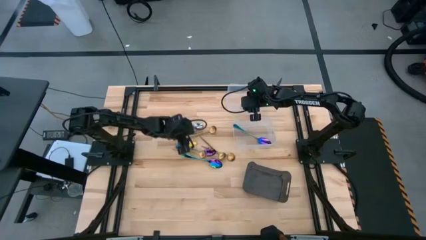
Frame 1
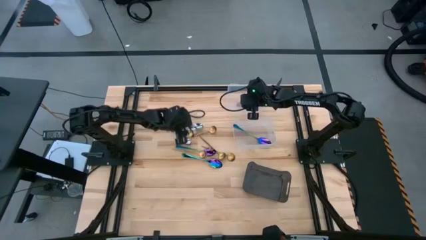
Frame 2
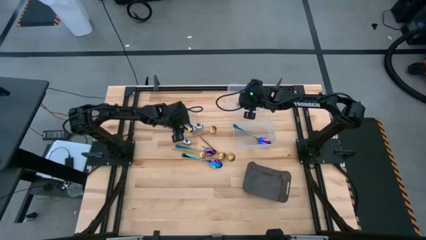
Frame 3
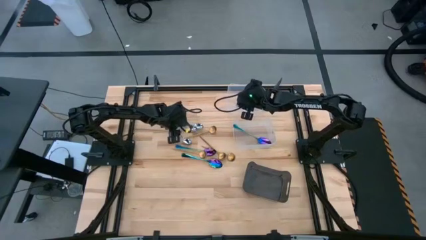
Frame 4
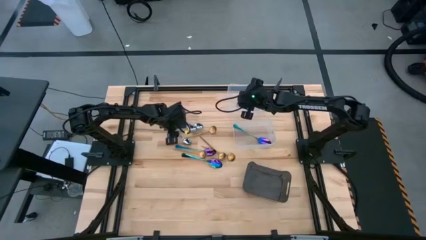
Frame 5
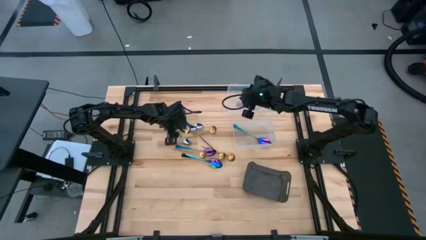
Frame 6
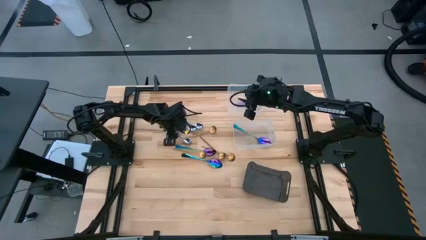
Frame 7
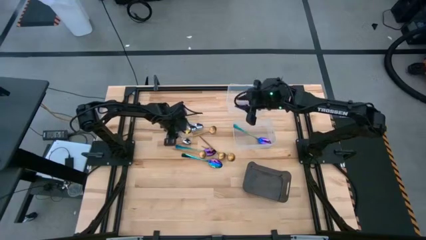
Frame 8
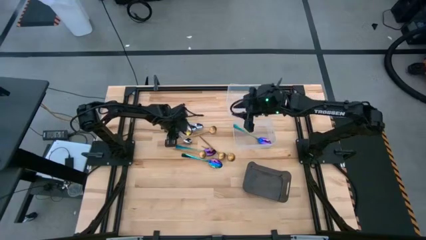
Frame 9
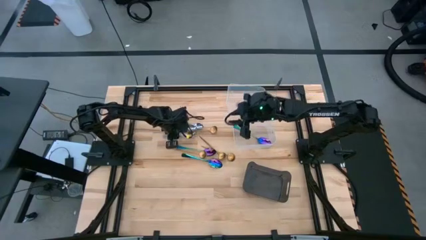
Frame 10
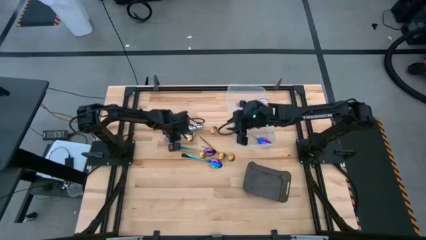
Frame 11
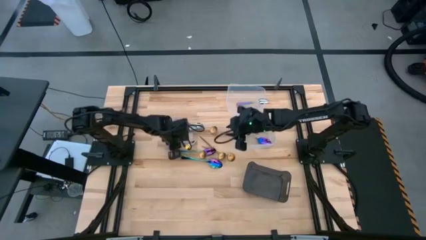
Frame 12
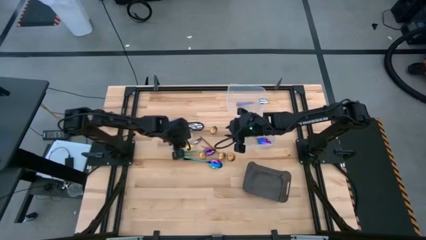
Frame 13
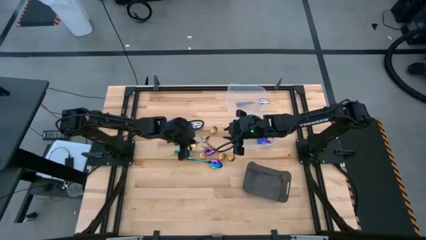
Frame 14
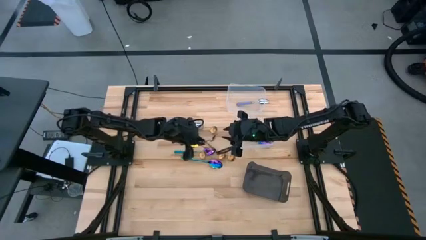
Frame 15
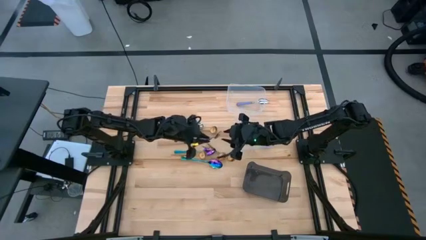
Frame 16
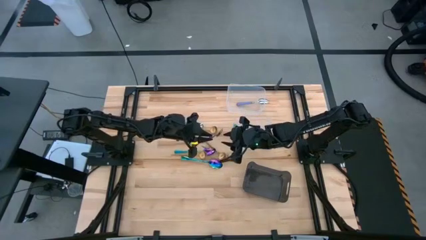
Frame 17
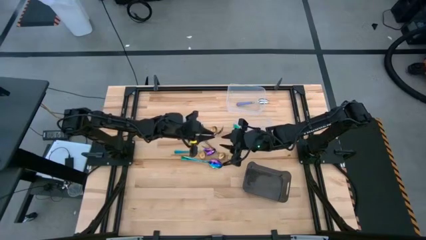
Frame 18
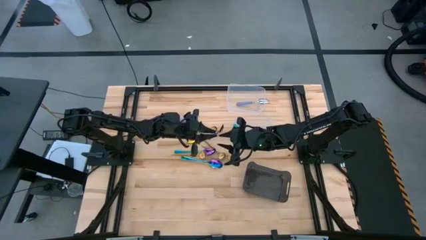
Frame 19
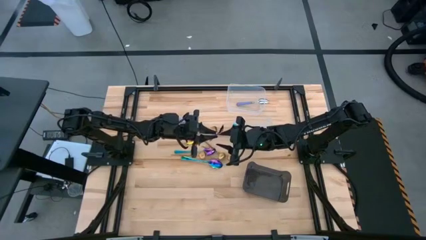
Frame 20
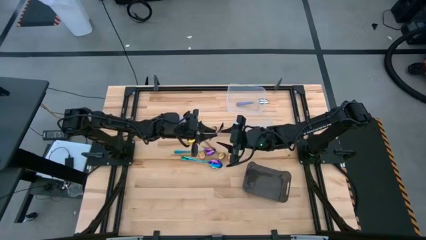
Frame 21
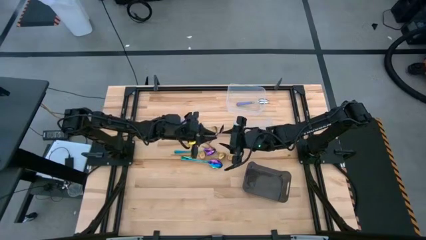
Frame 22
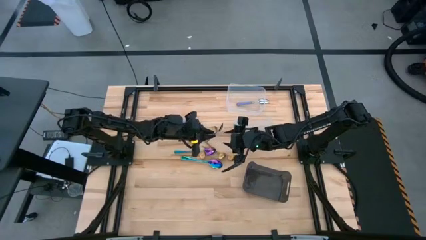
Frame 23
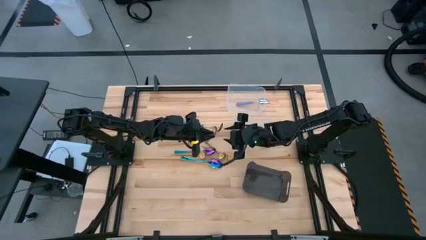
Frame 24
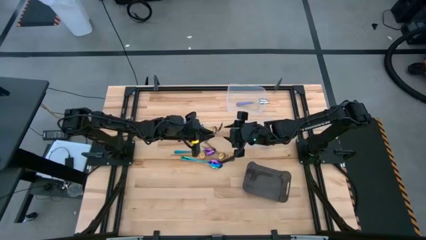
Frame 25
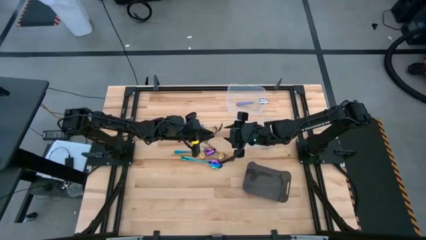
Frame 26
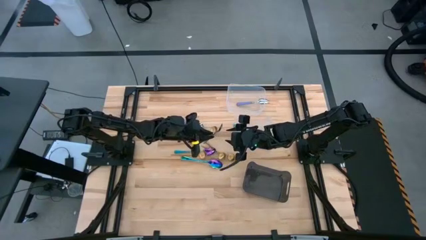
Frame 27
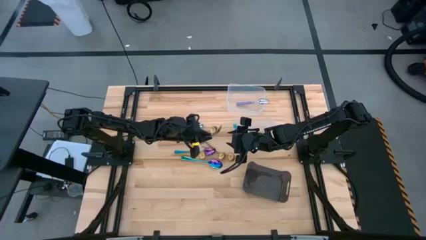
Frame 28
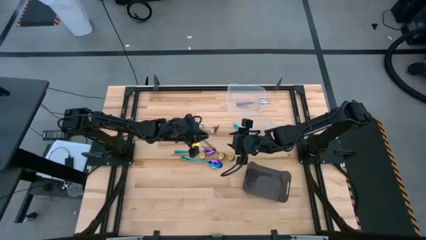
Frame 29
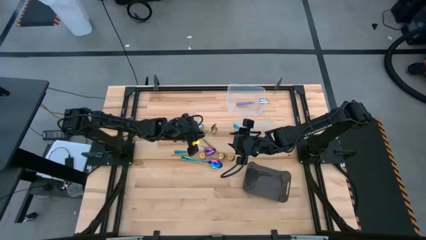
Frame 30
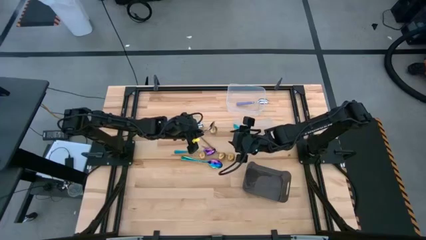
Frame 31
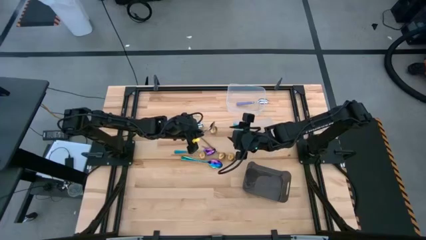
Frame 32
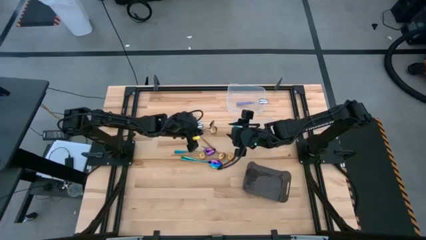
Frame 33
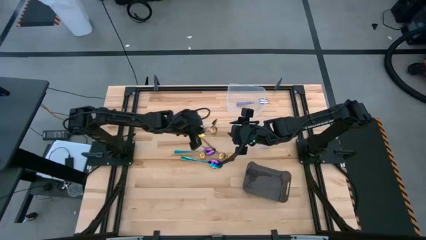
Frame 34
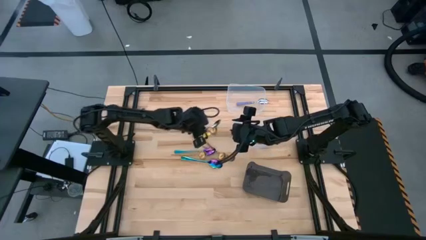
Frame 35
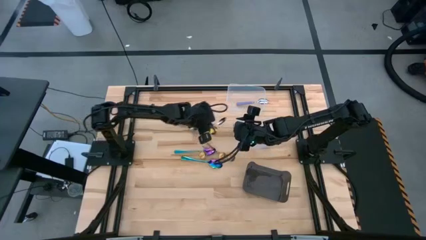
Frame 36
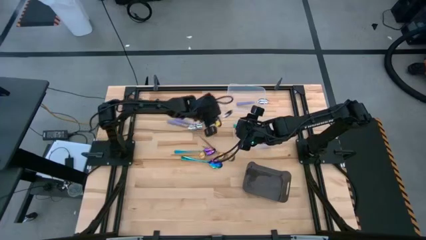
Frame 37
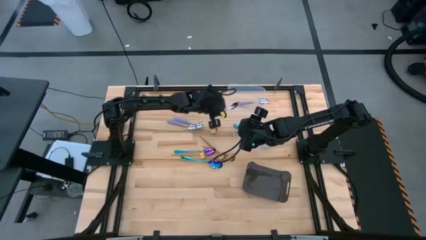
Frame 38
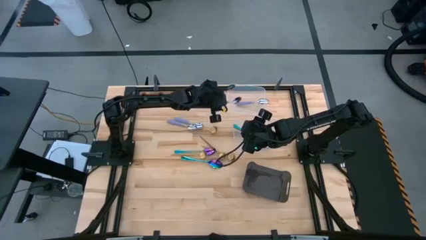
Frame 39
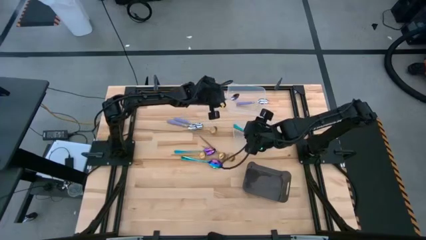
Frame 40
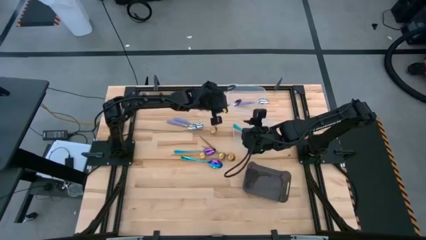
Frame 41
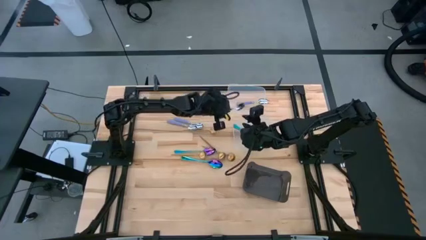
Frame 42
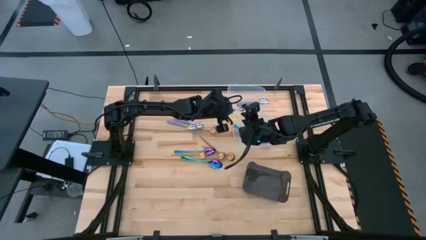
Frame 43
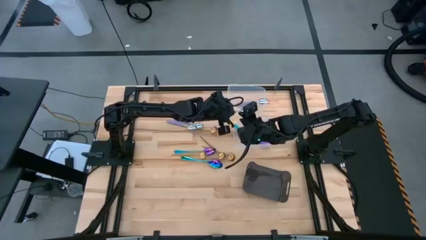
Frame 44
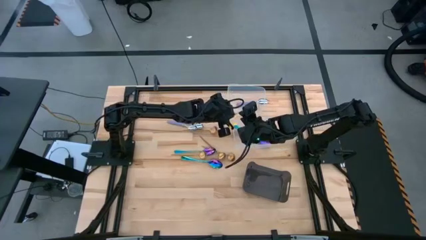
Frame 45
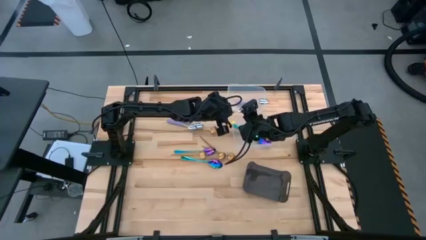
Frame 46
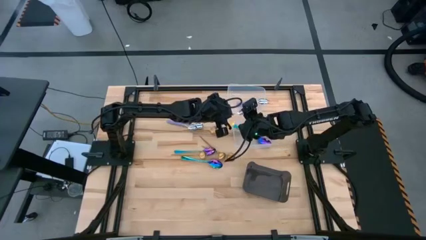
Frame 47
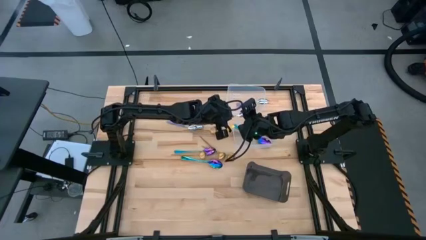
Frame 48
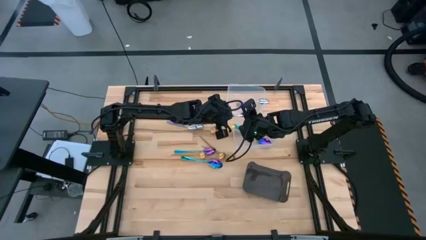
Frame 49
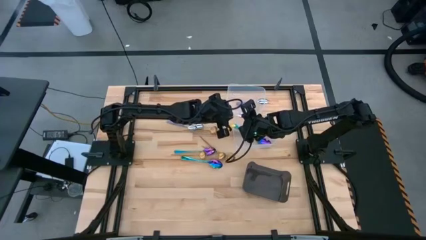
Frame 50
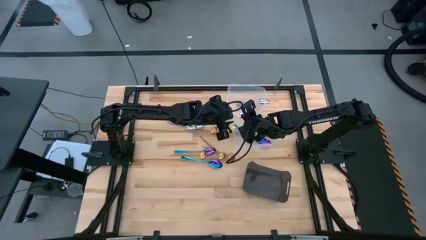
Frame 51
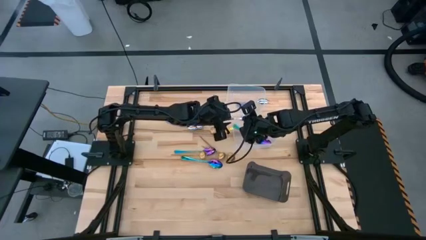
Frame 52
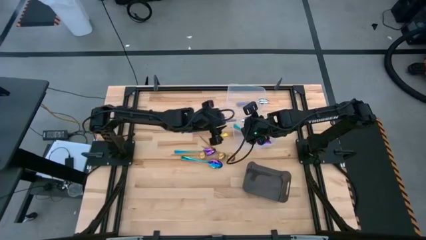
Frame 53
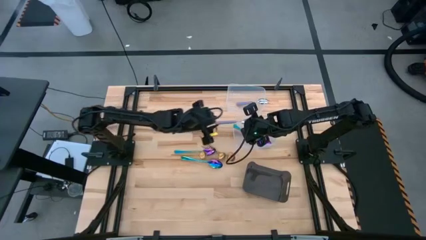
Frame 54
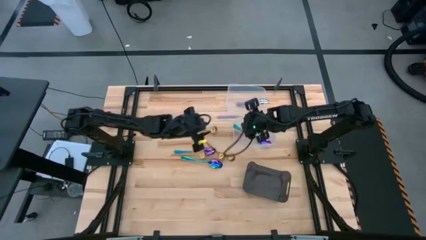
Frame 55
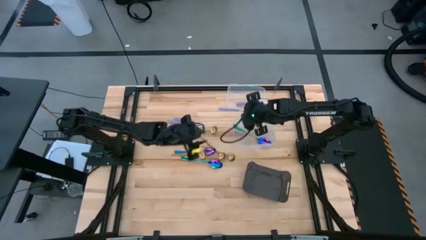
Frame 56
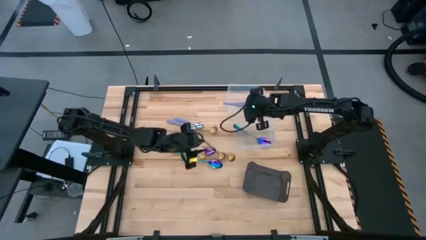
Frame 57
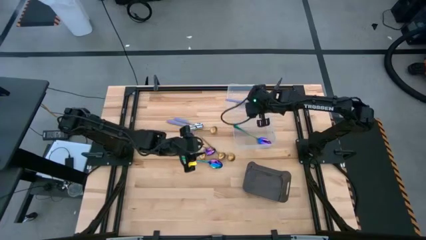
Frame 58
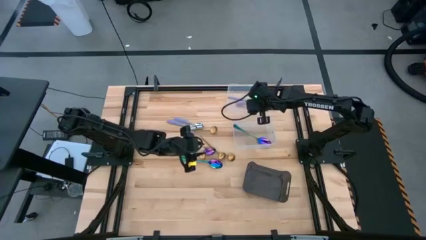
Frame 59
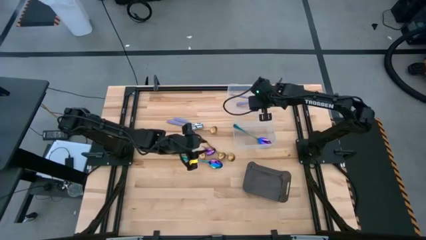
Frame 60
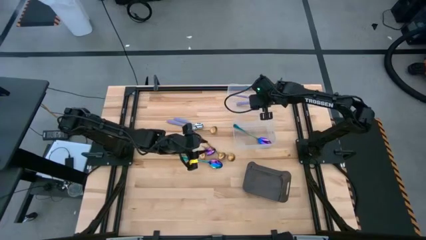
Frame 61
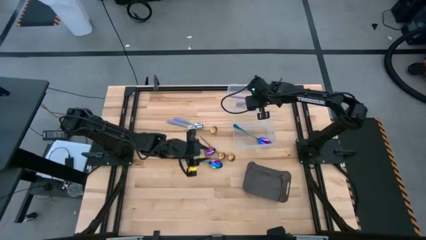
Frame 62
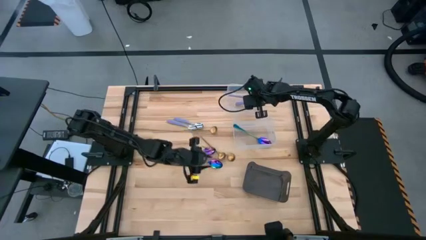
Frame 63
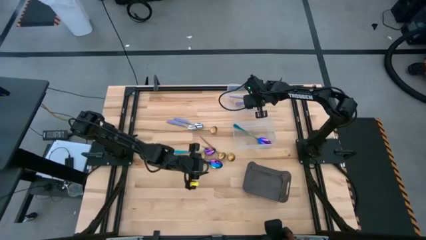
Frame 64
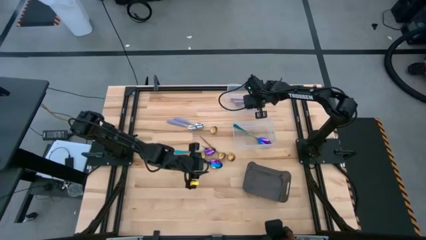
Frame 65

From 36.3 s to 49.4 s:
Task: Sort silverware by color (type)
Put the violet spoon into the top transparent bin

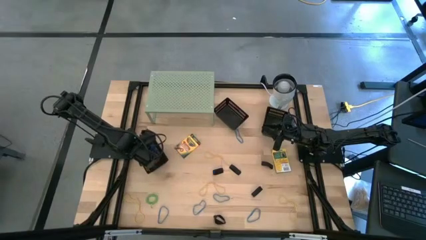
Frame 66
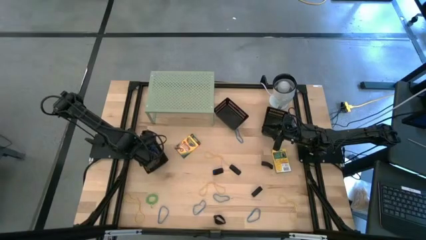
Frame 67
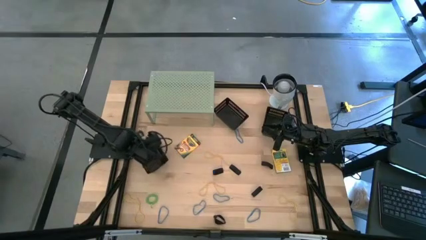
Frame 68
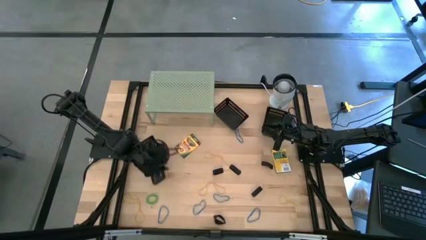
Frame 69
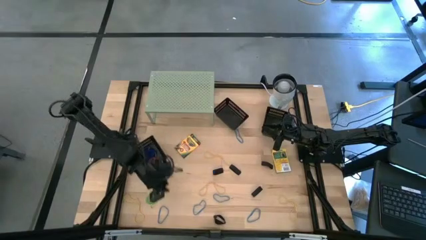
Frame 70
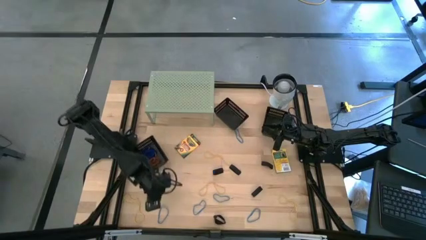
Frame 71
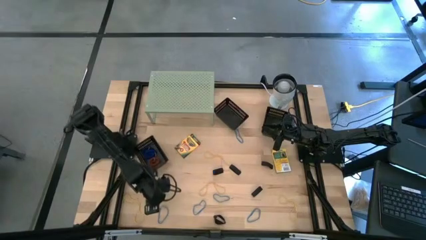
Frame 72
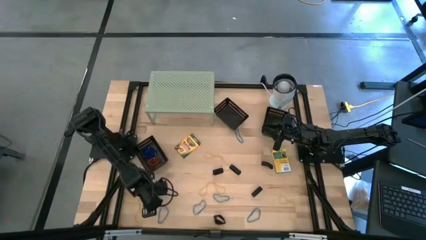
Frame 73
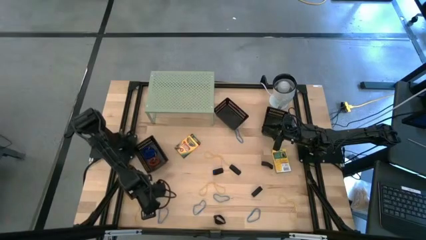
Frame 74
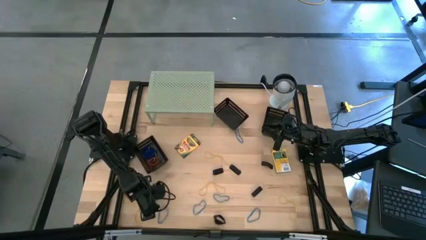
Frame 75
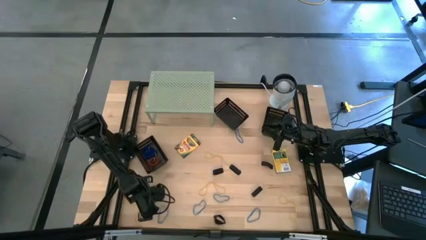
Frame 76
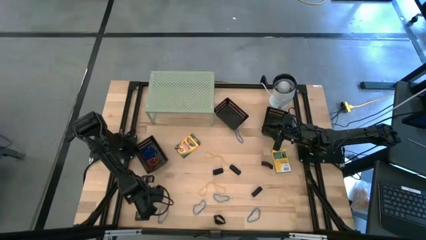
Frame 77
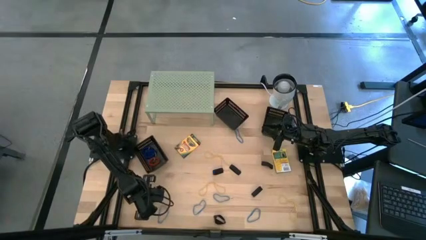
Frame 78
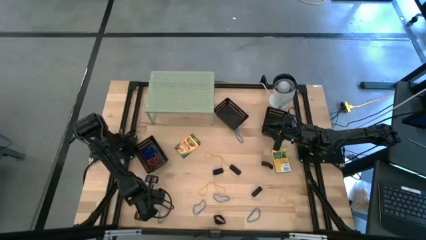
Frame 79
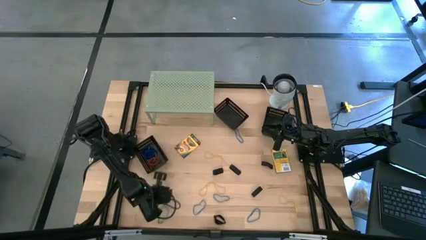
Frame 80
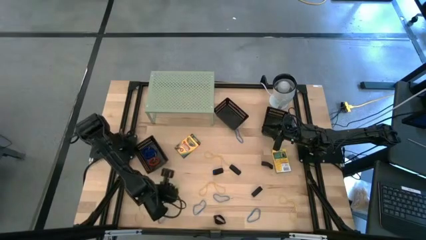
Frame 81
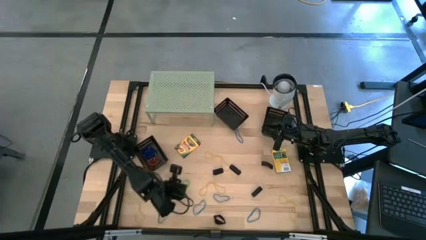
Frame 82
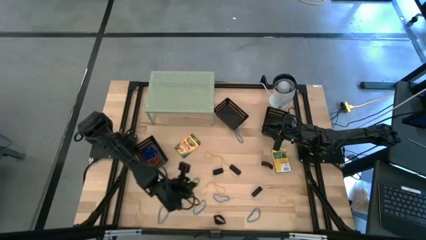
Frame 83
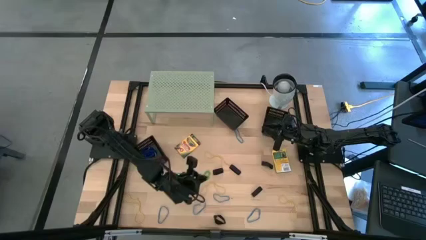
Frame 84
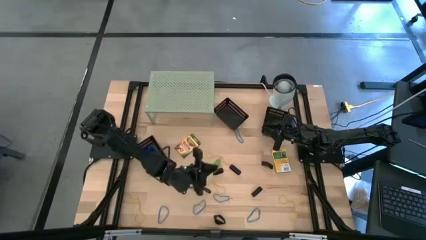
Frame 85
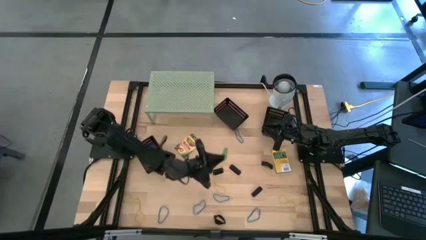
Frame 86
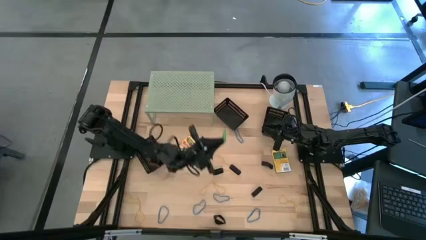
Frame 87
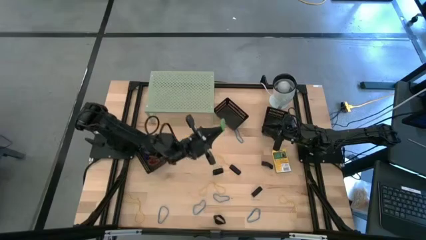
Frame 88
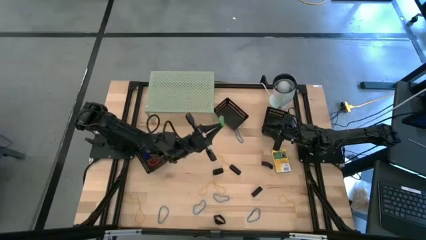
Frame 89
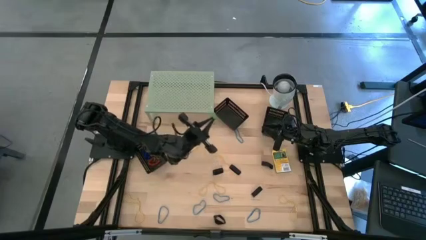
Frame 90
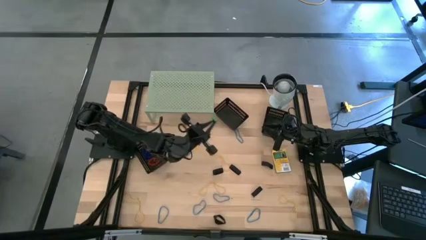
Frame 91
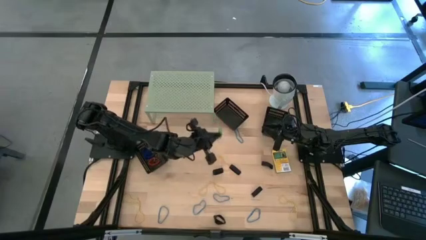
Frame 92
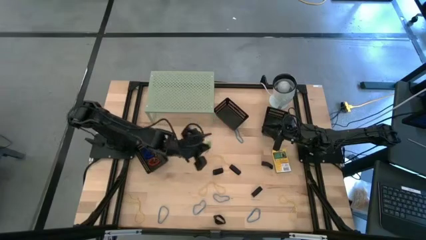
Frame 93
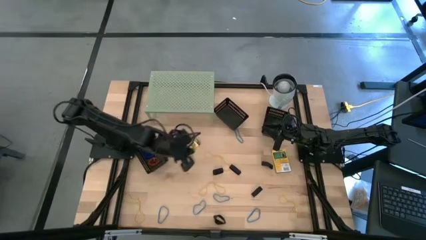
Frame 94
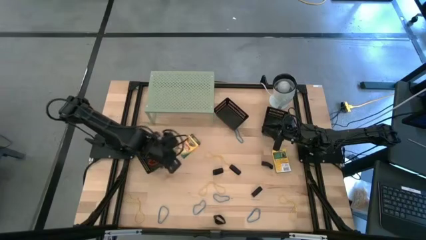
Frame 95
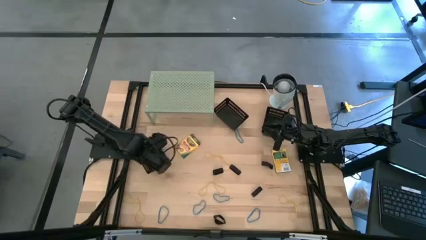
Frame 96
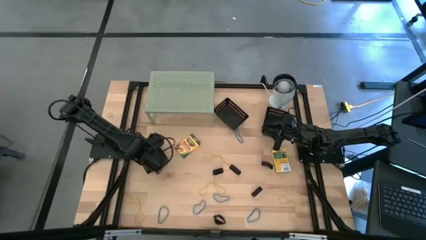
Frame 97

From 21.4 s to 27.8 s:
Task: Pick & Place Office Desk Supplies
Put the green keychain into the bottom black bin
